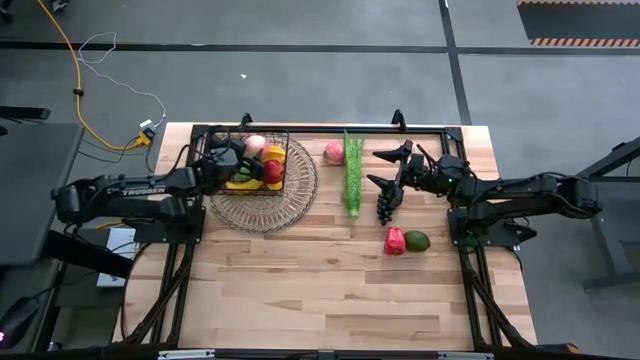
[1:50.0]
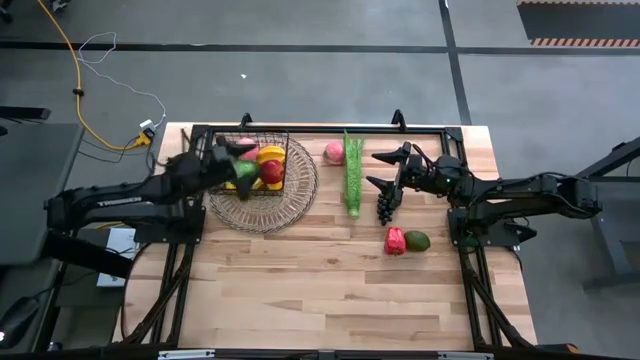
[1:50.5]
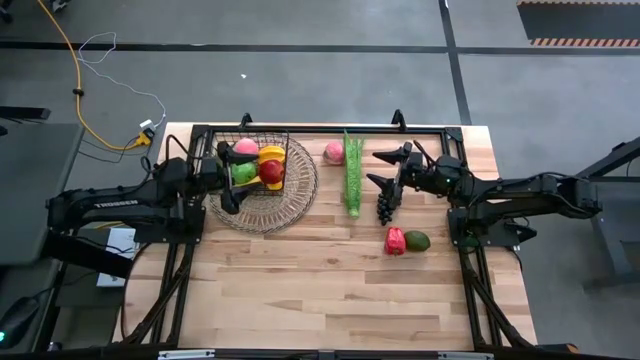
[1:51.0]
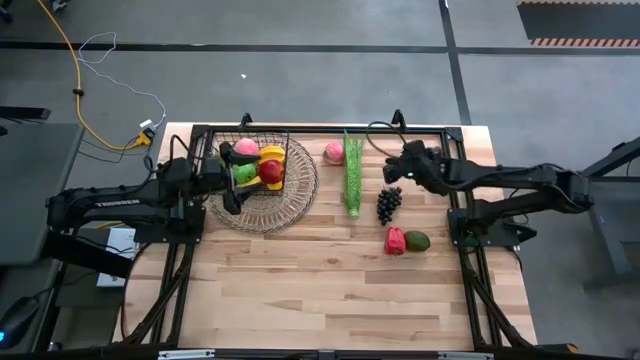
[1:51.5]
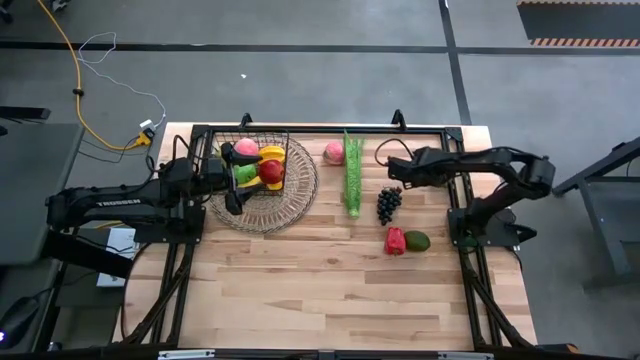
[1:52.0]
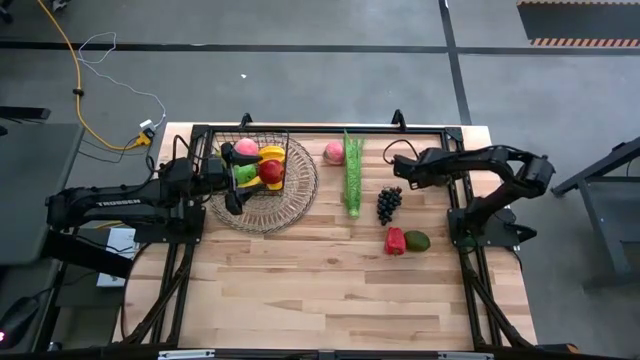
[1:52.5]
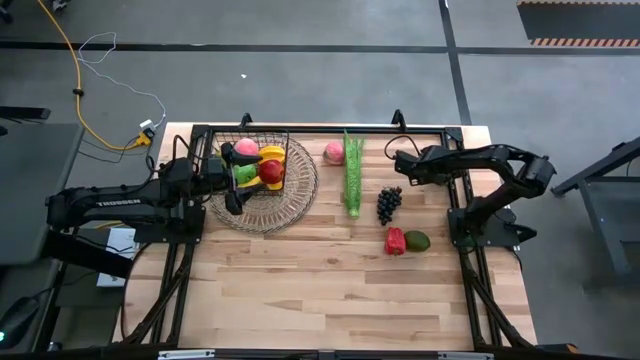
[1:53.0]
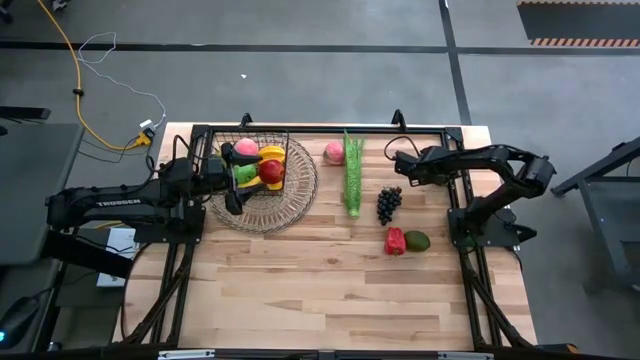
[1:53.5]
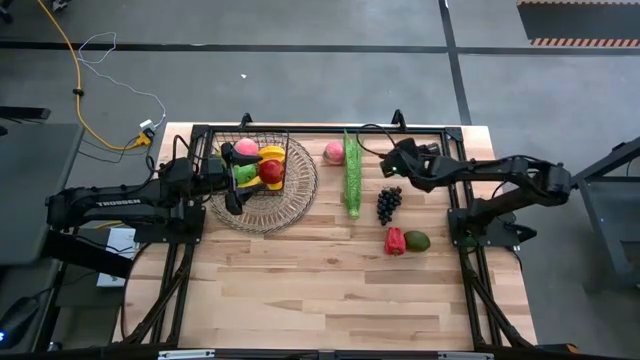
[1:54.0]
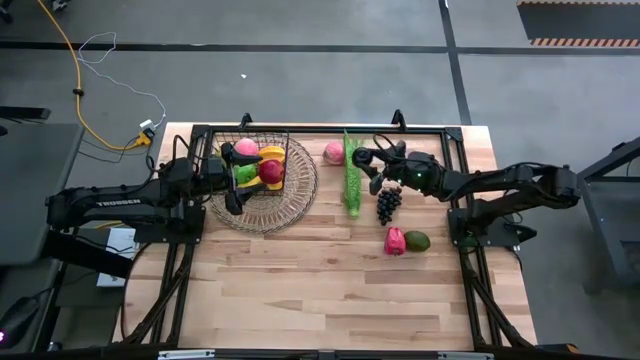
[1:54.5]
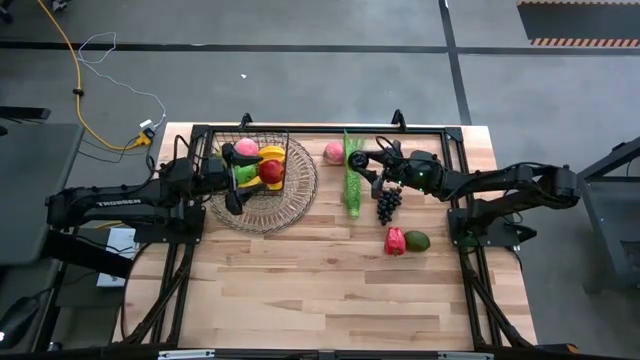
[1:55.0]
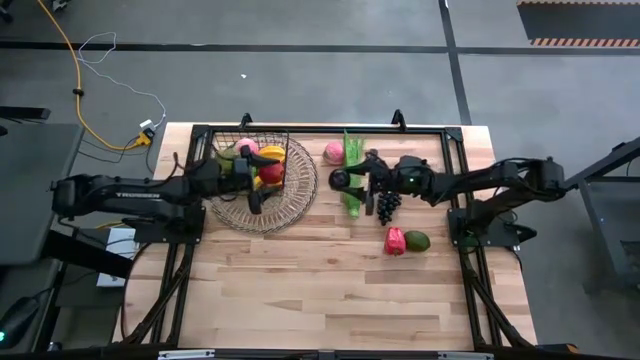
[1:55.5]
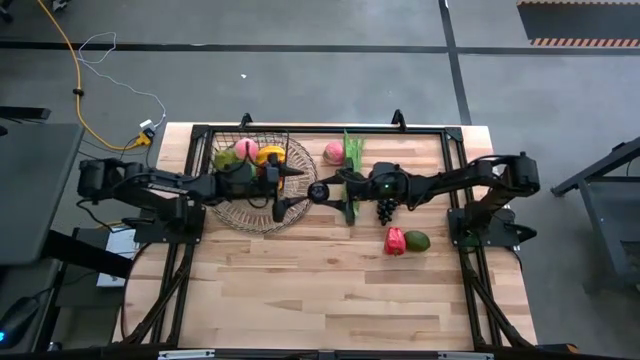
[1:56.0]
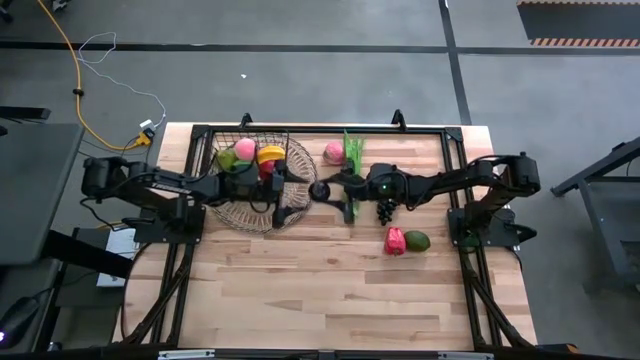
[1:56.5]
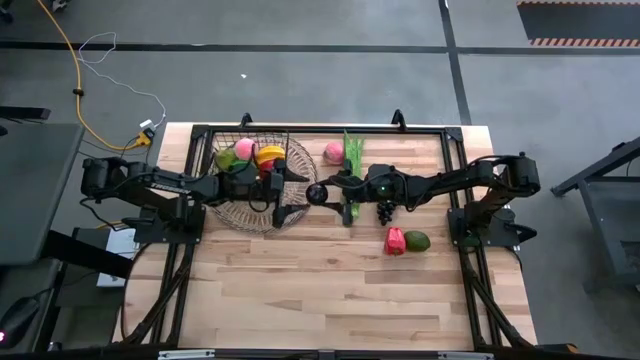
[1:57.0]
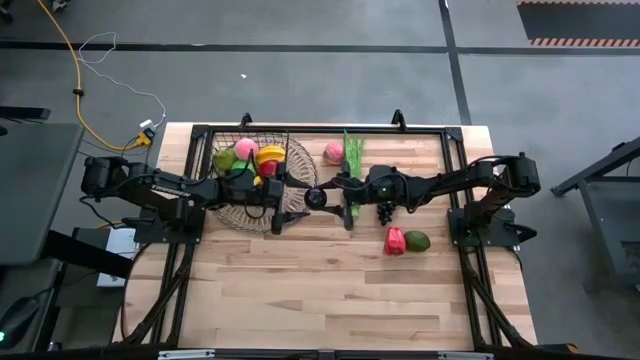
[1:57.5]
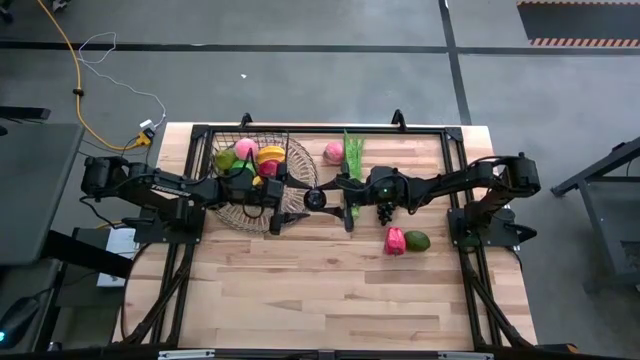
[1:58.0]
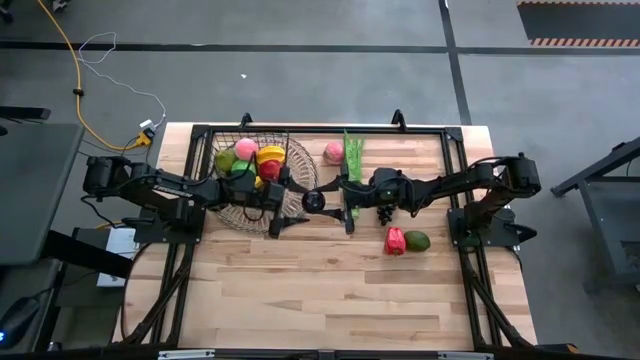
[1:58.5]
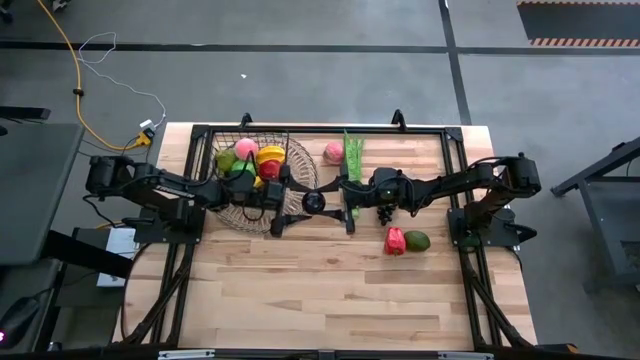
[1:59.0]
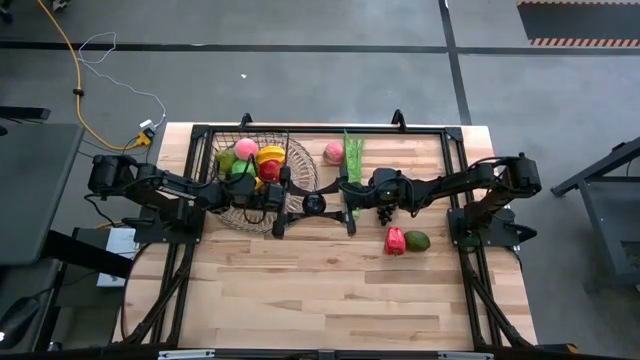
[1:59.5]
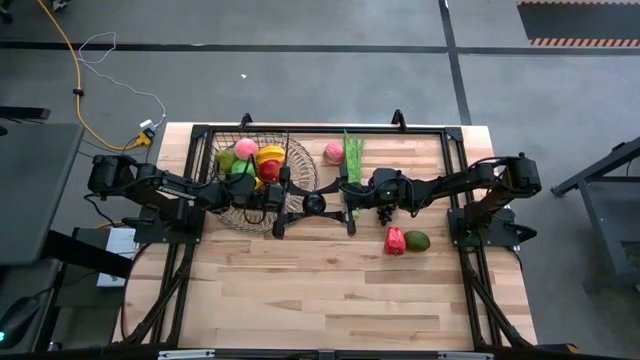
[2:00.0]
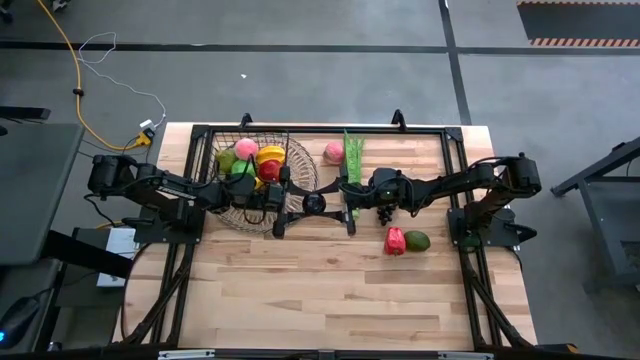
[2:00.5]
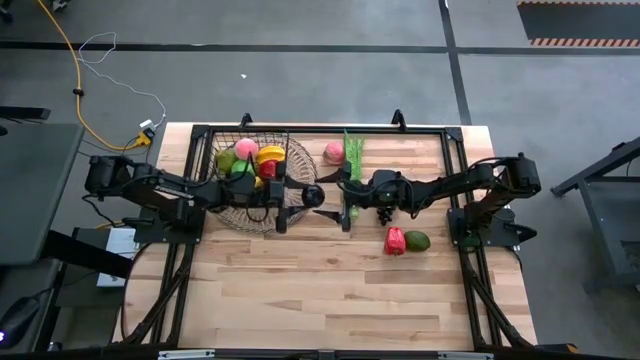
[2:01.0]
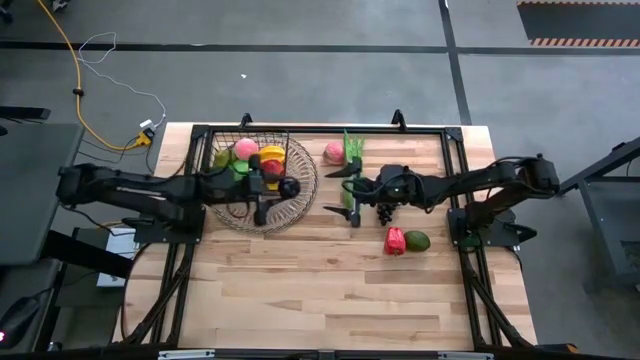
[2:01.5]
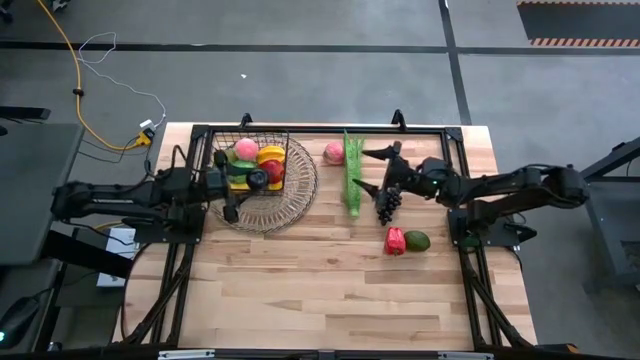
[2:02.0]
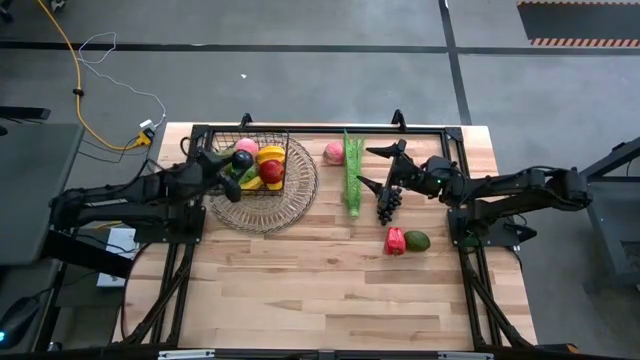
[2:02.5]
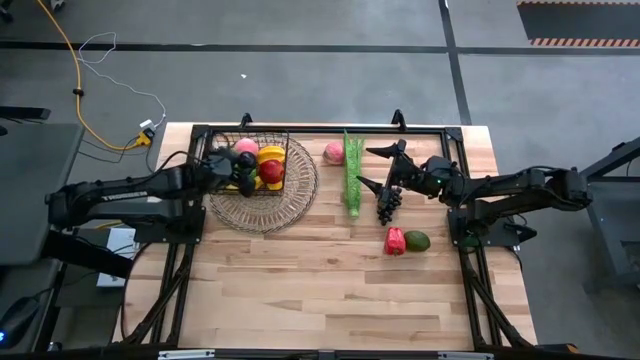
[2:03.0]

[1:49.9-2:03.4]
Task: Build produce basket
Put the black mangosteen into the black wire basket

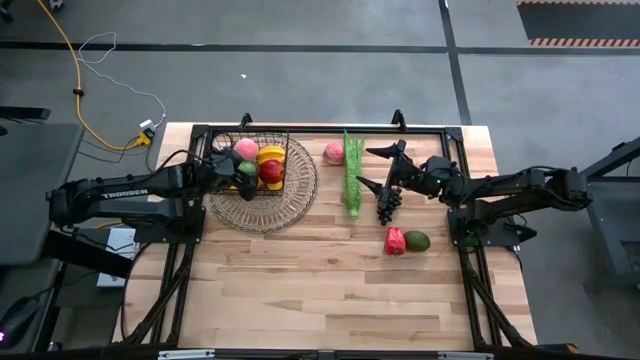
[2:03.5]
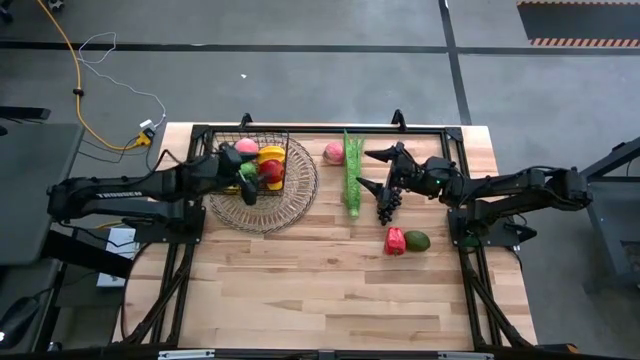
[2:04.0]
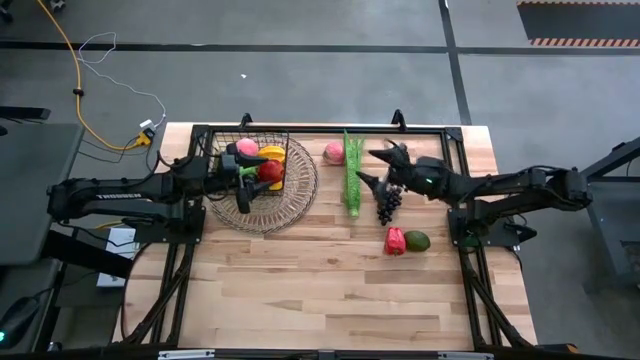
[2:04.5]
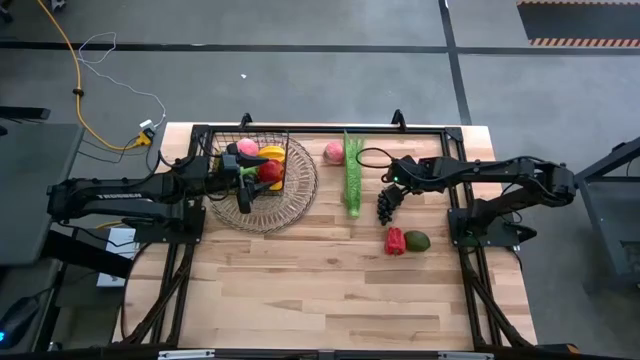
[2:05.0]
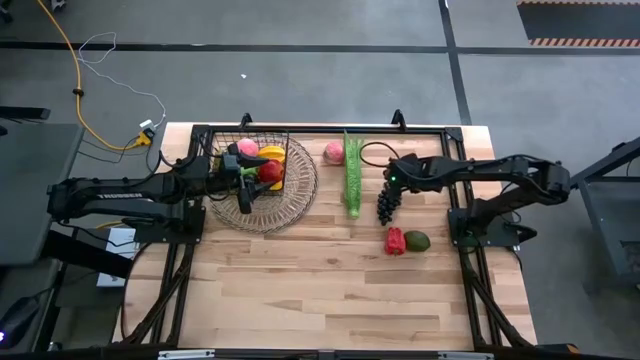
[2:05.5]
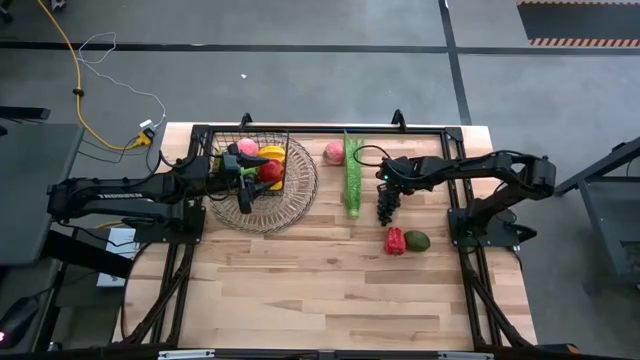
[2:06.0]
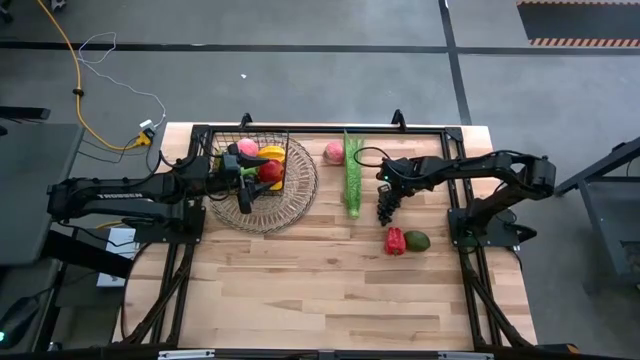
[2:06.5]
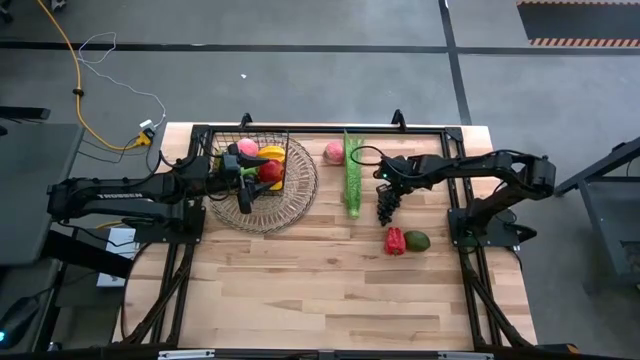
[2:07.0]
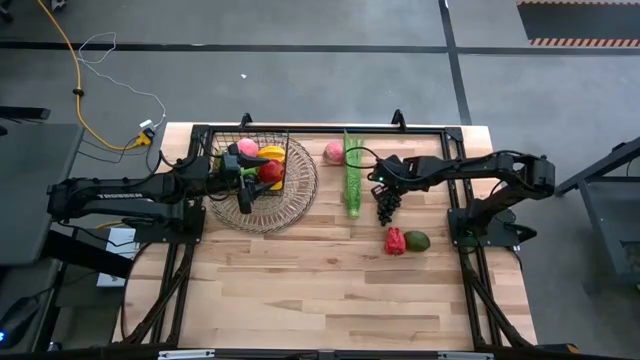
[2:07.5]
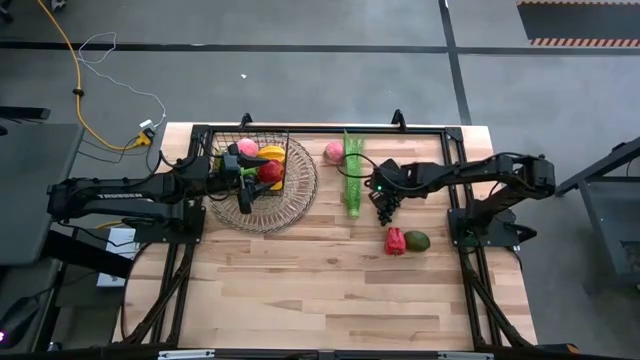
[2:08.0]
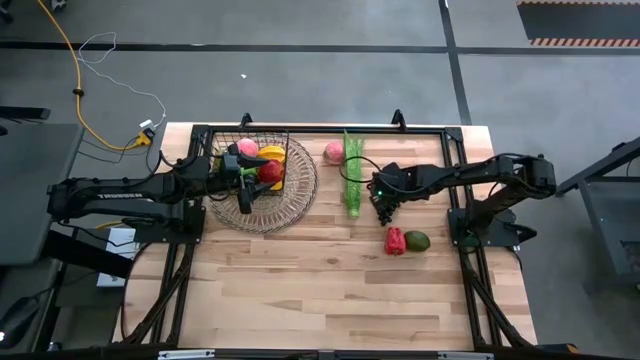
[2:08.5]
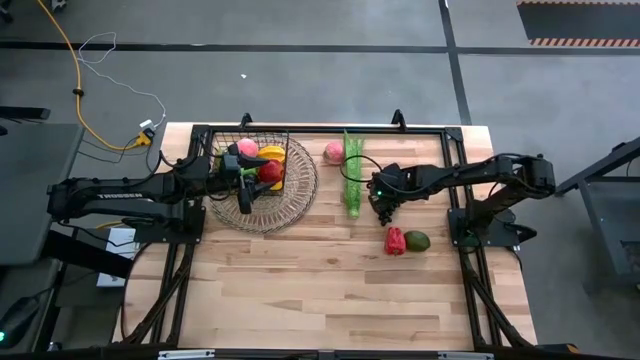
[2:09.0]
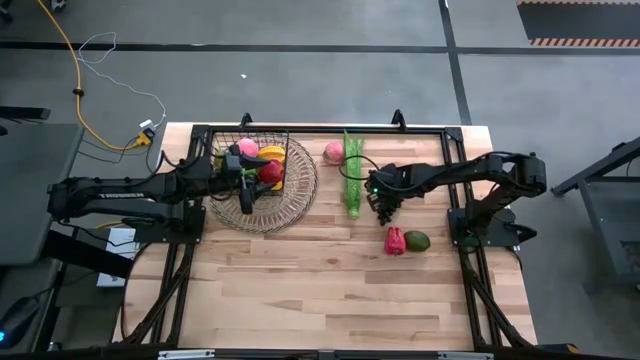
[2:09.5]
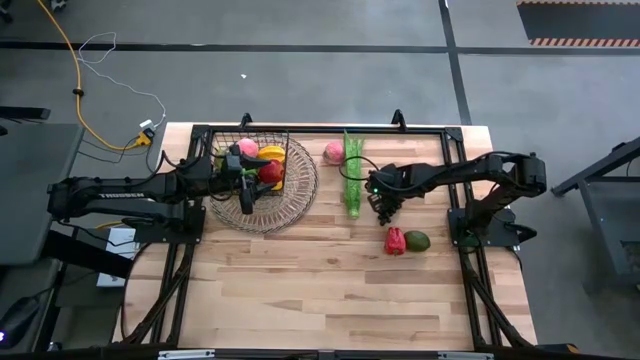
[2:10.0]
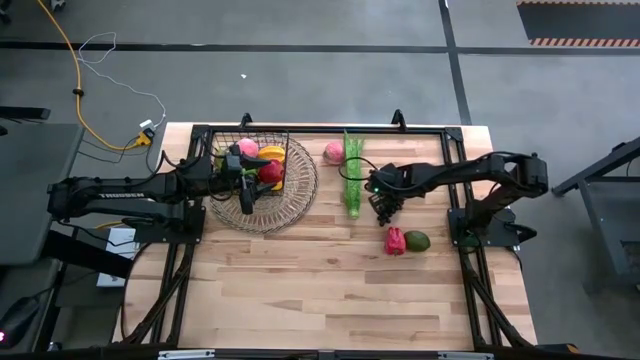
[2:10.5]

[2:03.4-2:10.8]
Put the black grapes into the black wire basket
